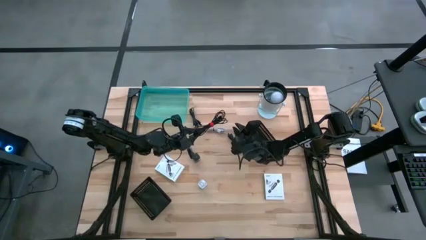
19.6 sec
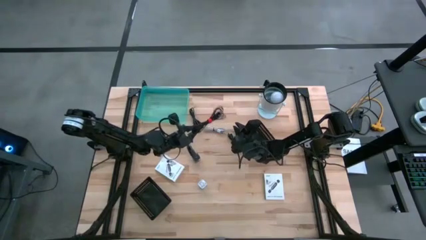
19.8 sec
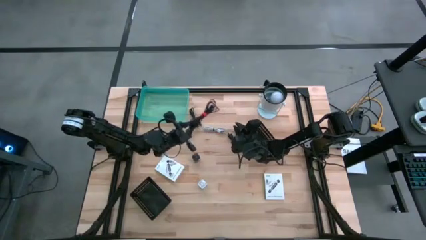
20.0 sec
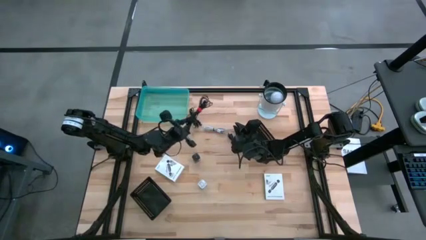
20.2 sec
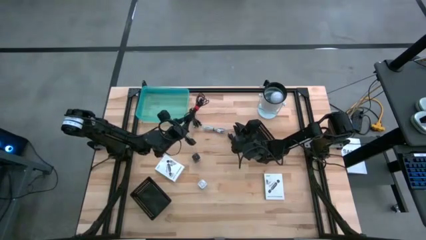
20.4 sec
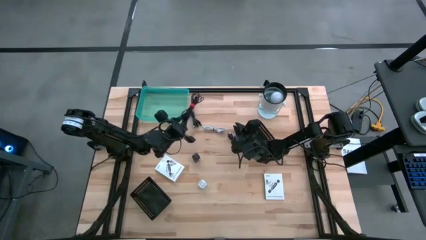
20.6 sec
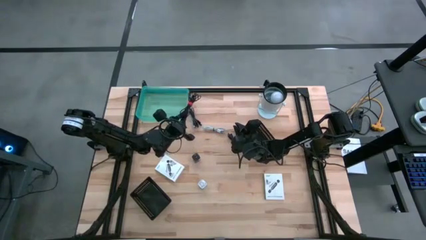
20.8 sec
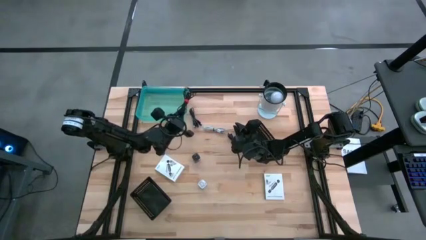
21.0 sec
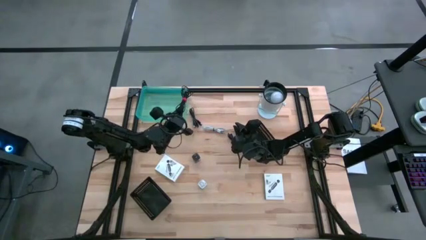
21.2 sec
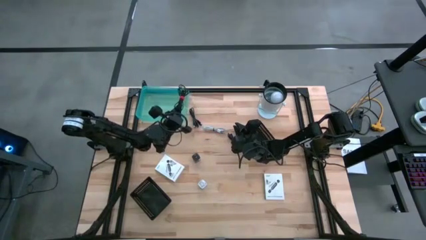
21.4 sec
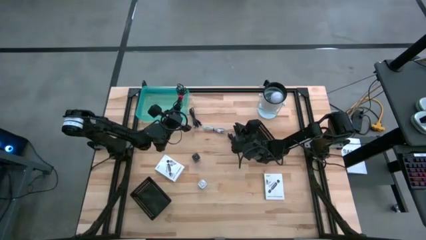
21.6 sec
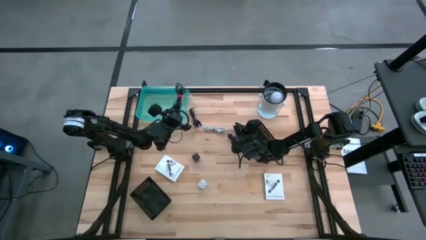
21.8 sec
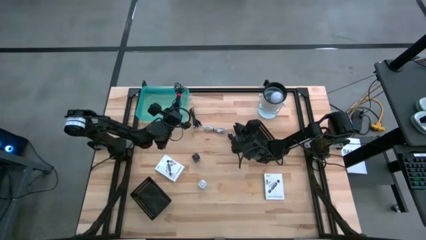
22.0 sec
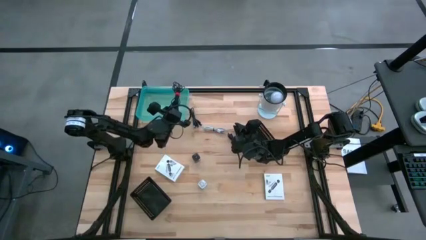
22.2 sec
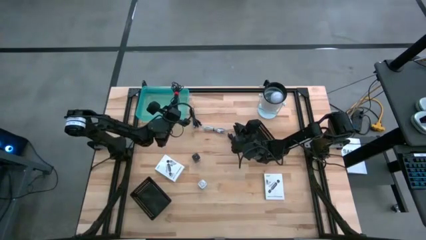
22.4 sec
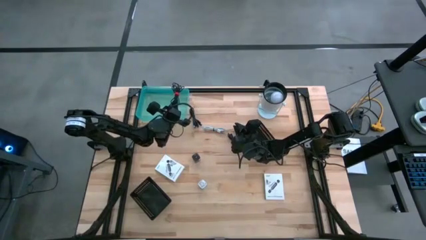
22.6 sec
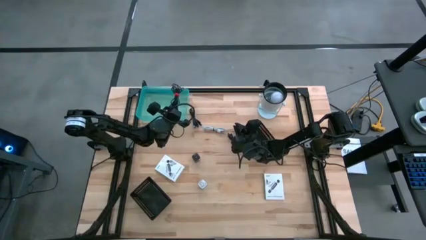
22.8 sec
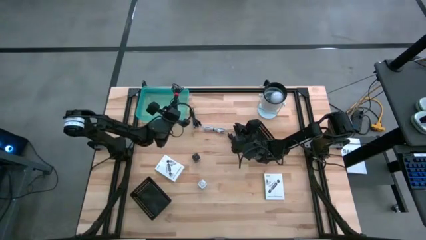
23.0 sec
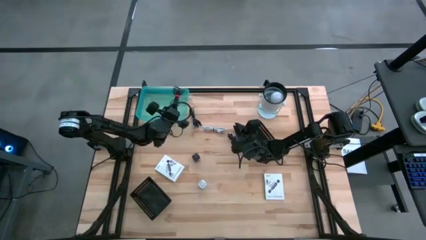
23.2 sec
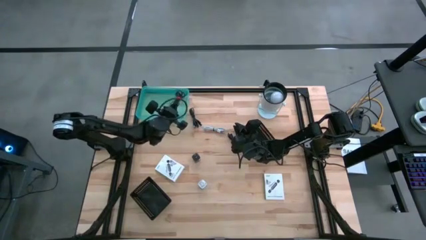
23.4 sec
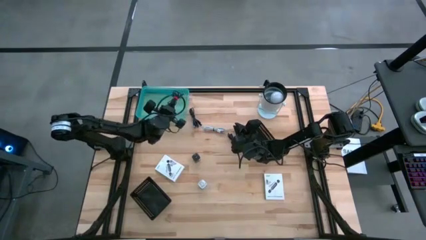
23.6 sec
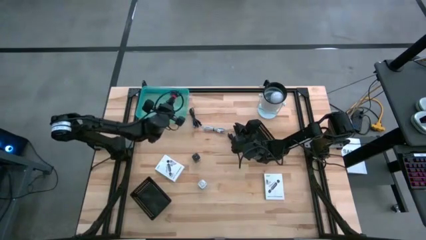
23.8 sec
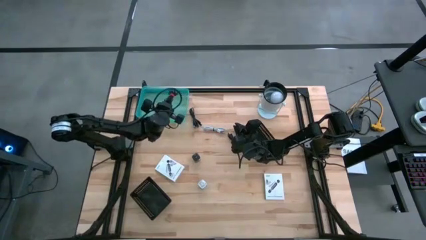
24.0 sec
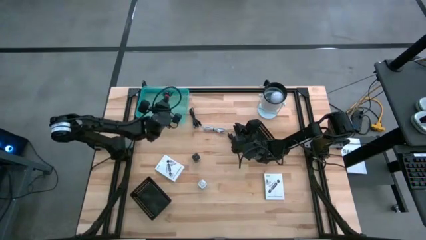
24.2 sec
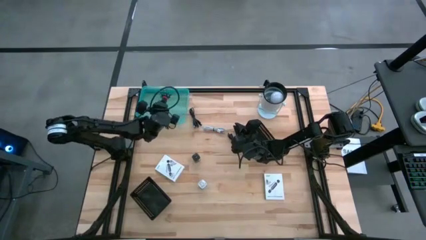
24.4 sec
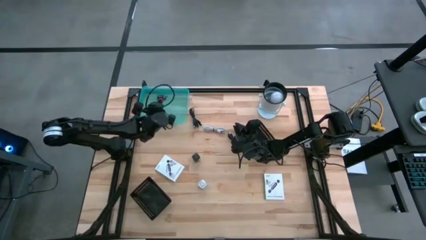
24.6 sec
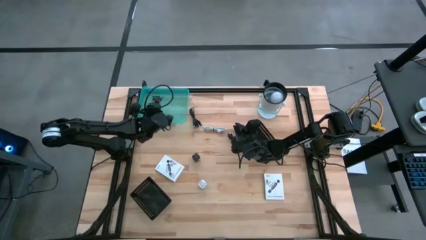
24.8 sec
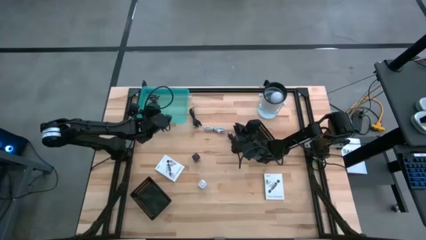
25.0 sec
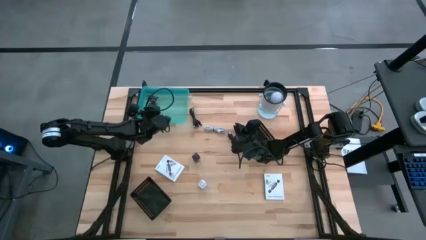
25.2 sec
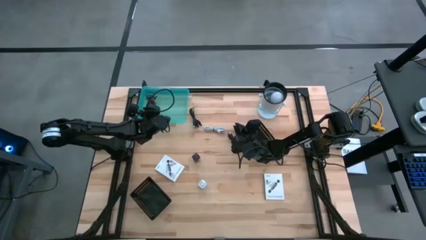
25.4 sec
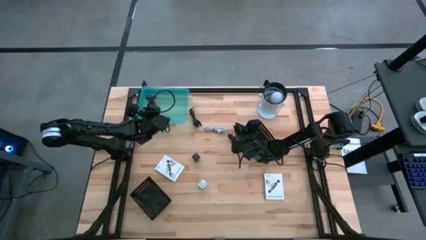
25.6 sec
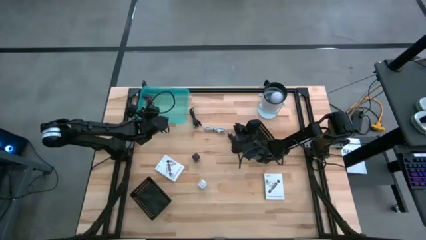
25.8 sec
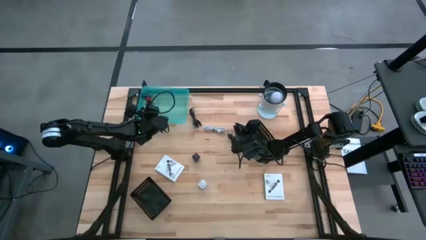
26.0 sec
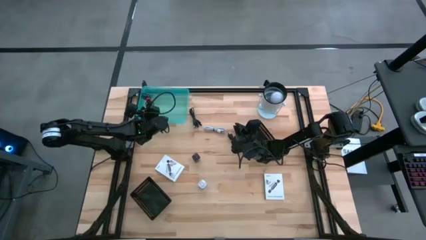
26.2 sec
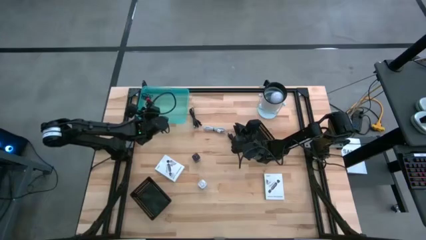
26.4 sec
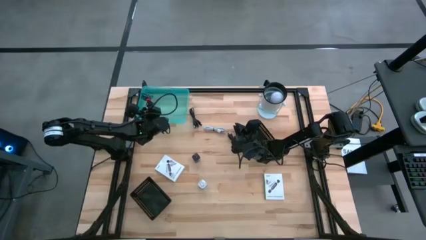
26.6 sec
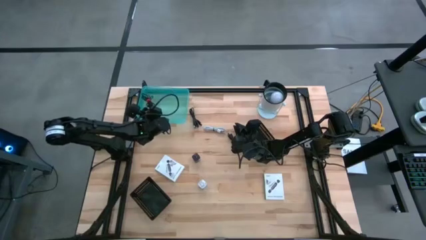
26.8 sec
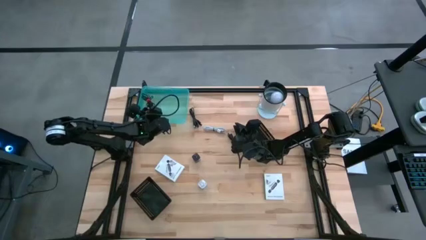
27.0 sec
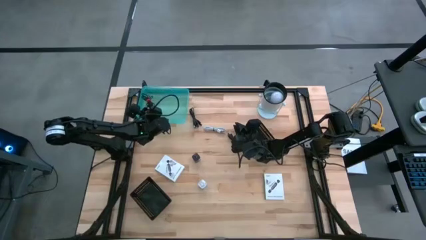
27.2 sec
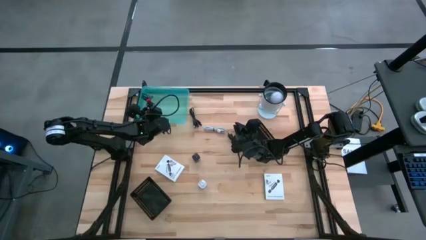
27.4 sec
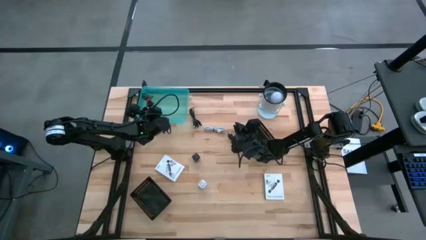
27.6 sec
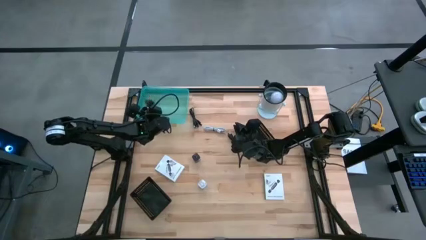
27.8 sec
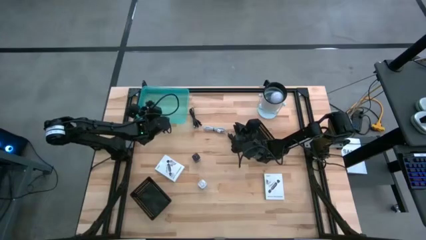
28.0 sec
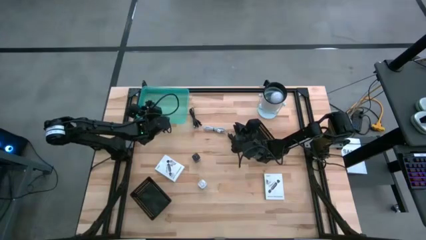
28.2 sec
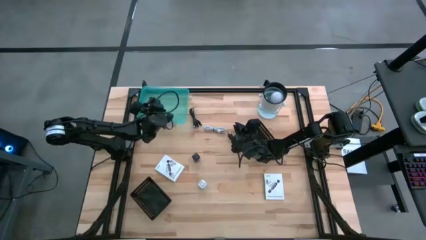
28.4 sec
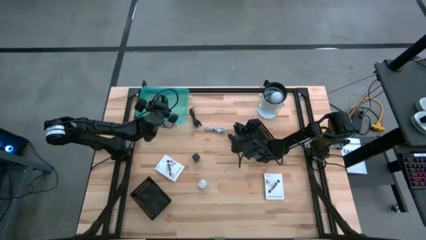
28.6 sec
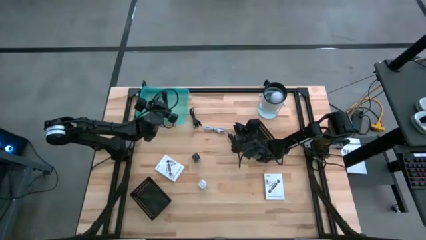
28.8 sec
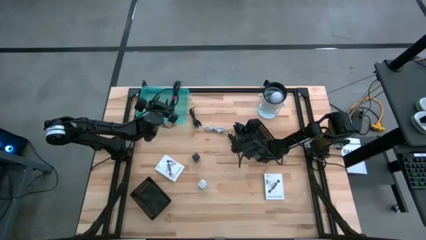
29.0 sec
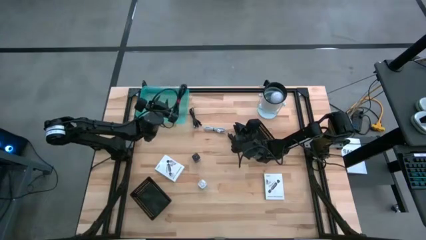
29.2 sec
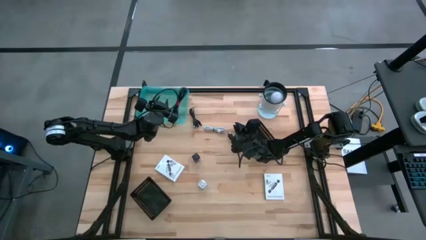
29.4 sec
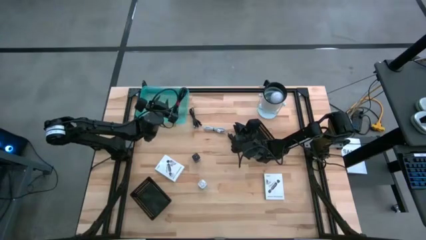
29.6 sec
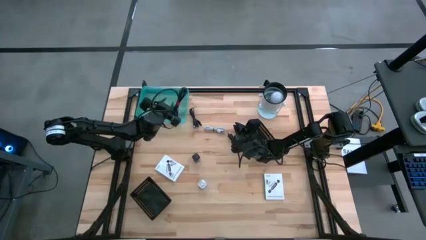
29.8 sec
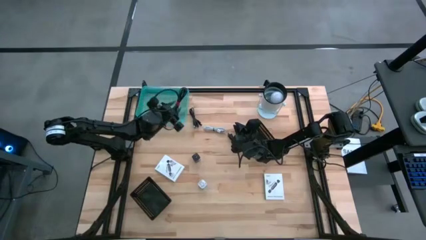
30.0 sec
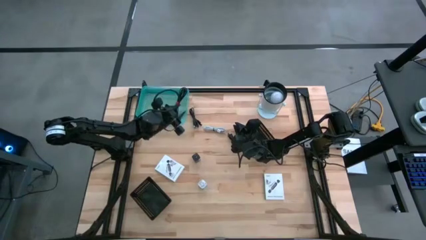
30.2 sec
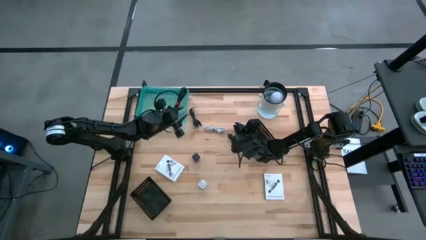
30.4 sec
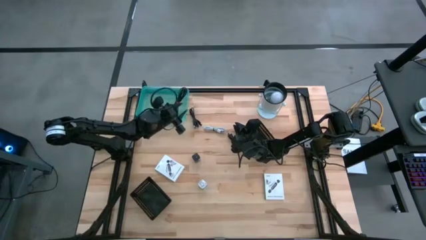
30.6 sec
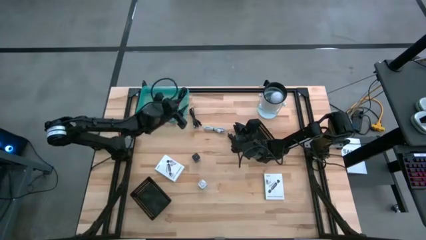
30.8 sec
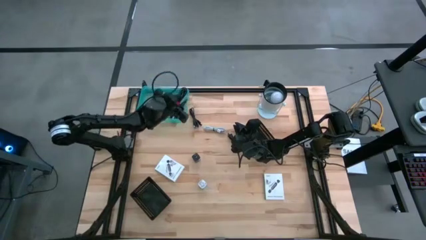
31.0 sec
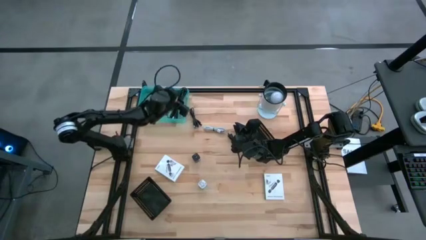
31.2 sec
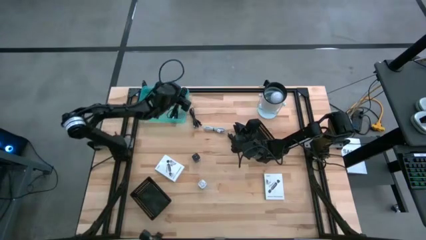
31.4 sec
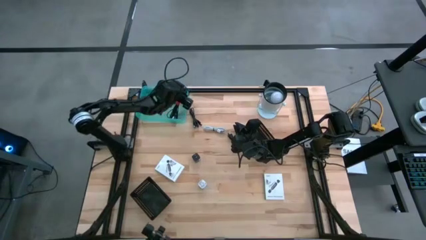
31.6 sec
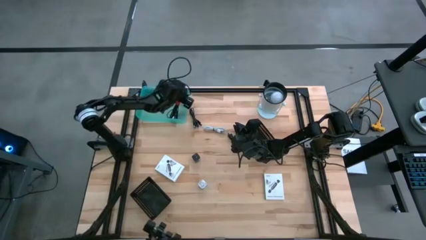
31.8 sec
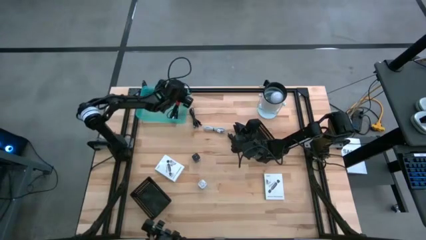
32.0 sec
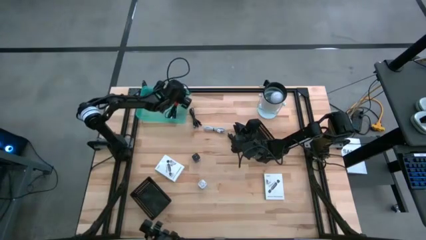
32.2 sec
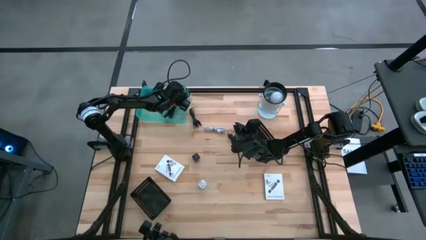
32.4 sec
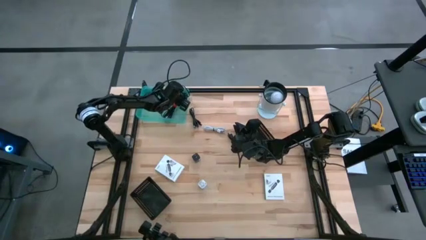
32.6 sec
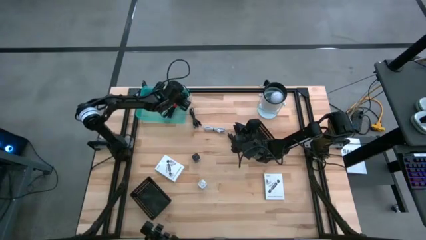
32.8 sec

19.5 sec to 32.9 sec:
Task: Pick and place items into bin
Put the bottom black charger cable into the green bin
